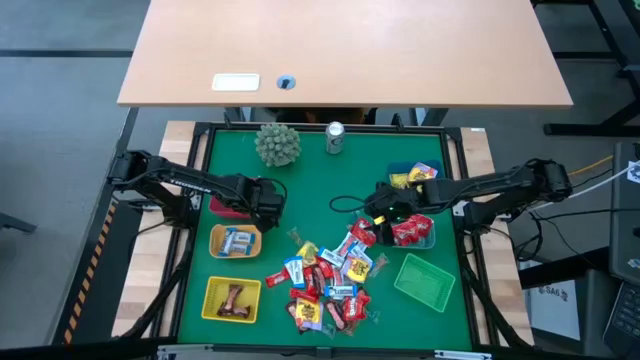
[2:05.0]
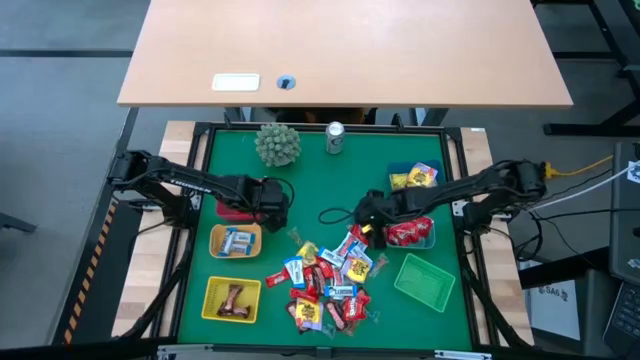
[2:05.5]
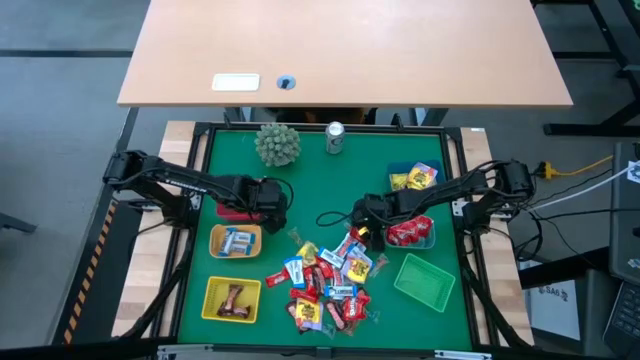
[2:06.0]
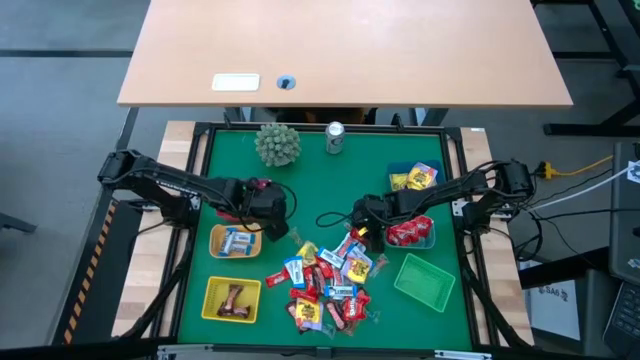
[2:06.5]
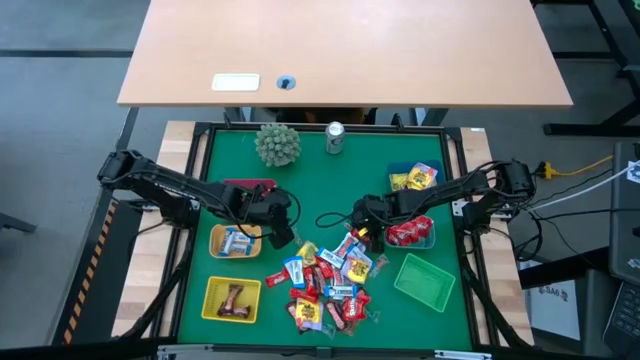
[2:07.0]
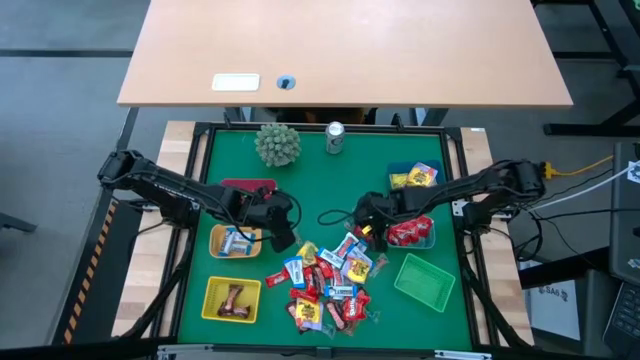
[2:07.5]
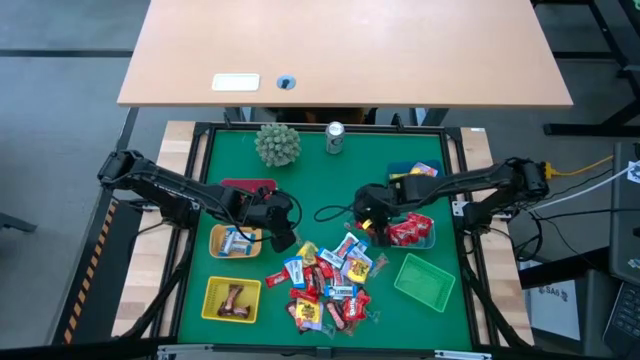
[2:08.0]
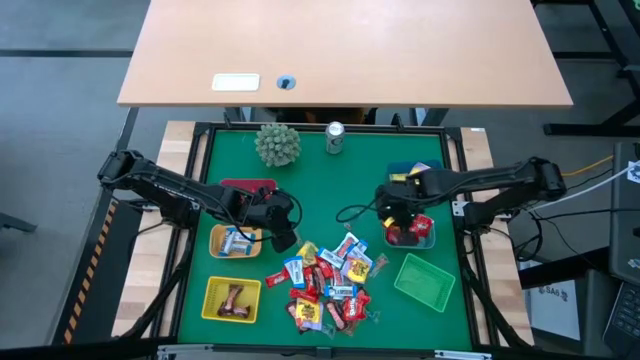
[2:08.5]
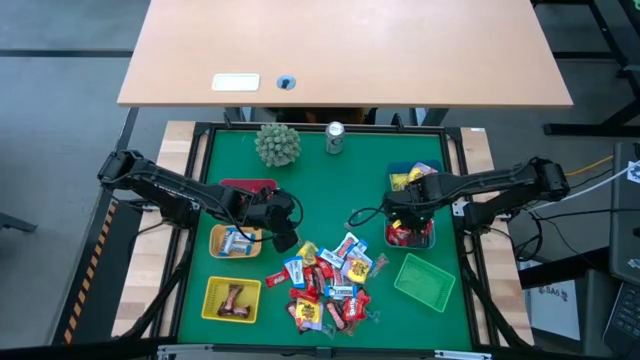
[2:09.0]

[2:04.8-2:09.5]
Task: Sort candy
Put the red candy into the light blue bin

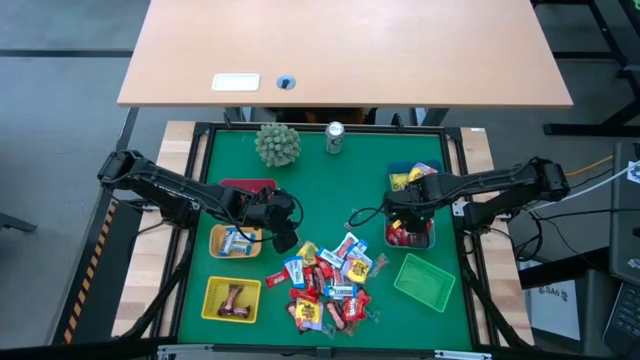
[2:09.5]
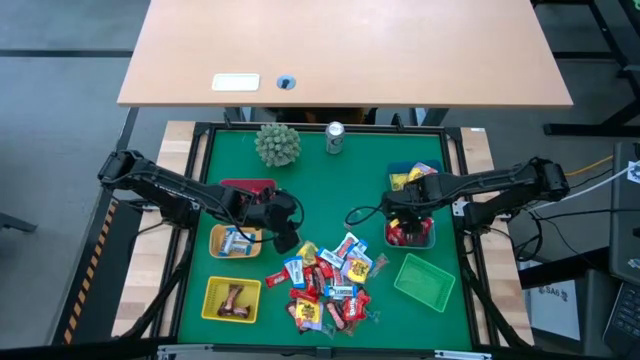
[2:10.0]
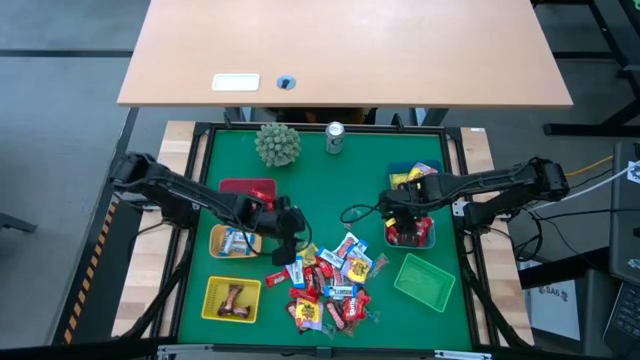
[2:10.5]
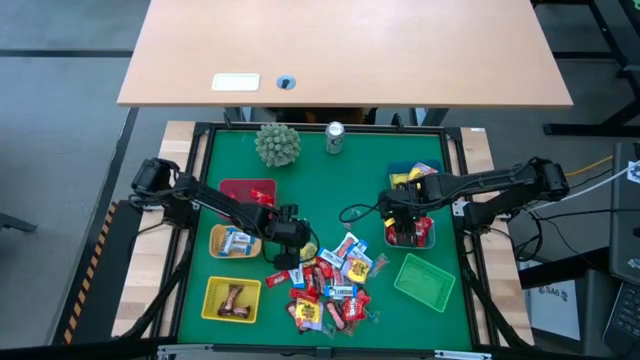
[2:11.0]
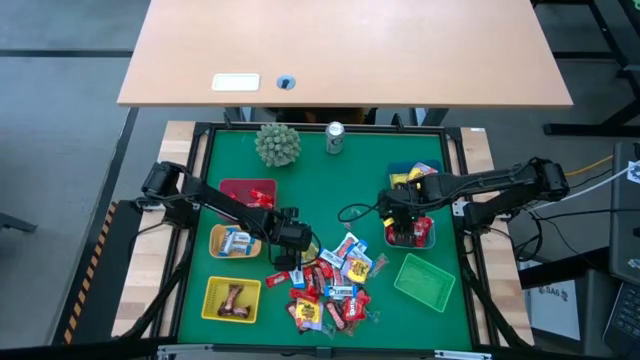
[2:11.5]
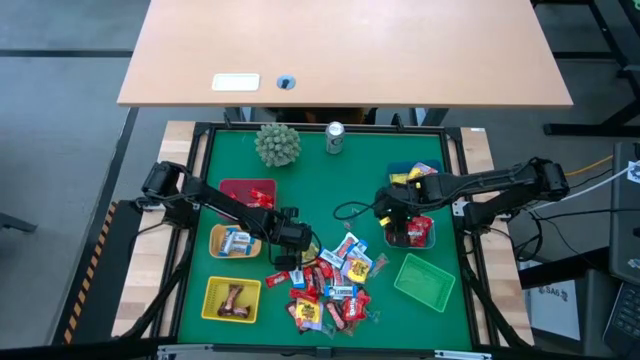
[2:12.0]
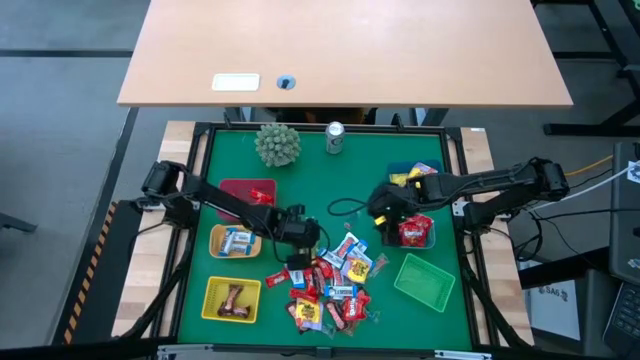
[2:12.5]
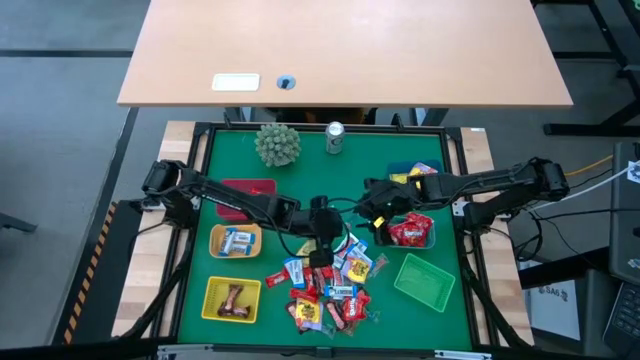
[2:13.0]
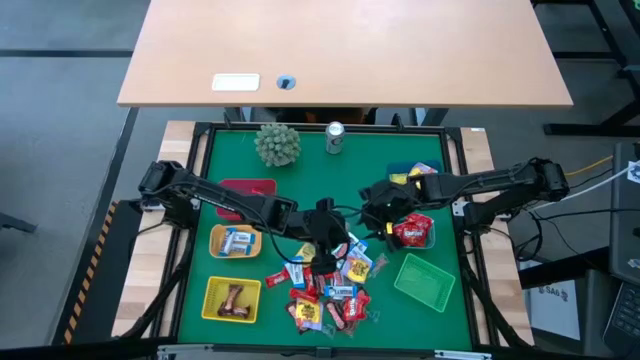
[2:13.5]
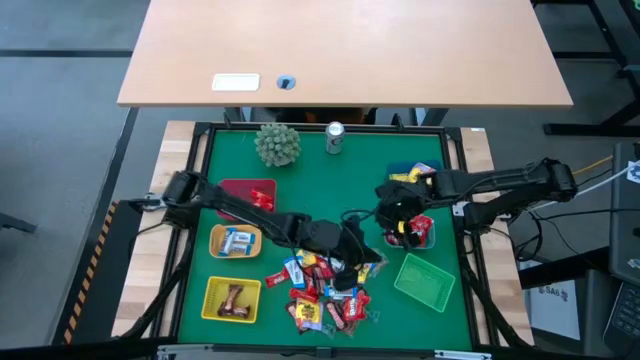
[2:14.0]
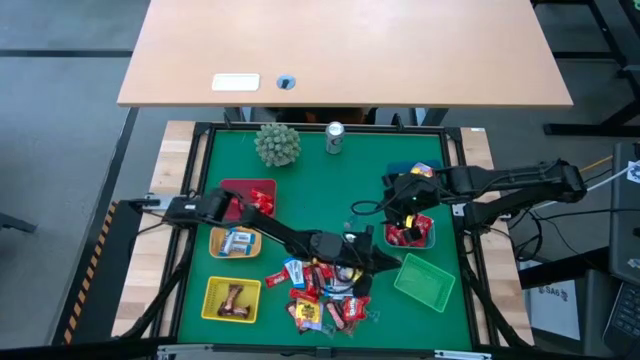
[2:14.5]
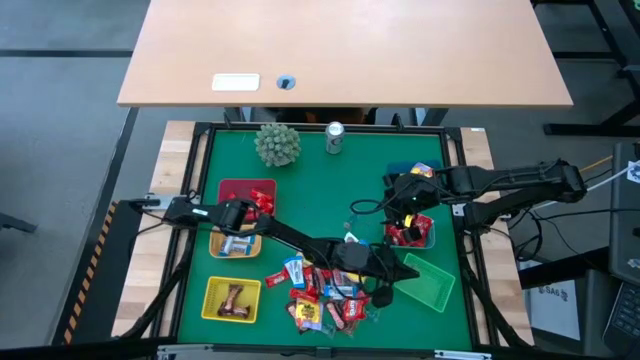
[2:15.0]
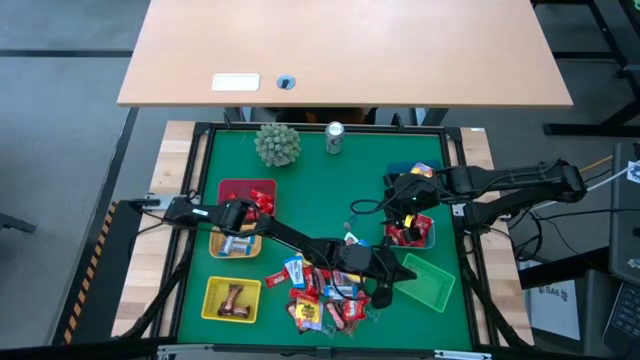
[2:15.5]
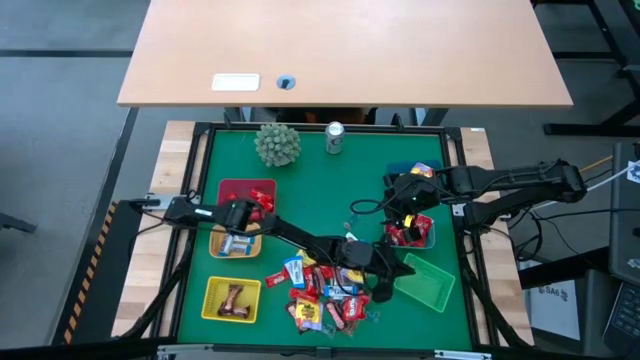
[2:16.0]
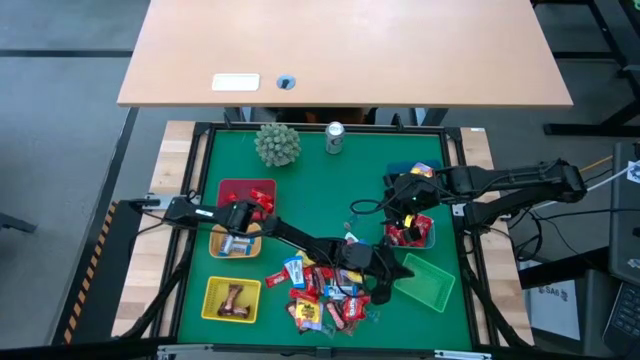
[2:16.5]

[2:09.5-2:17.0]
Put the green gummy into the green bin

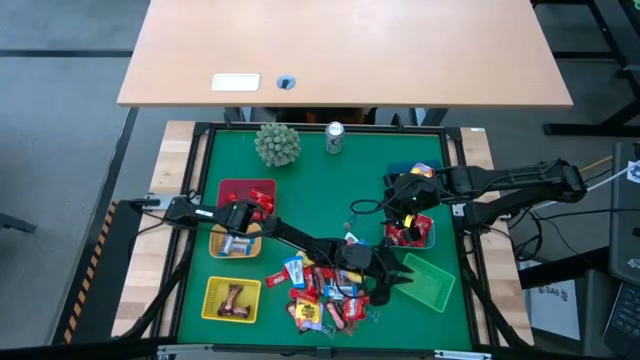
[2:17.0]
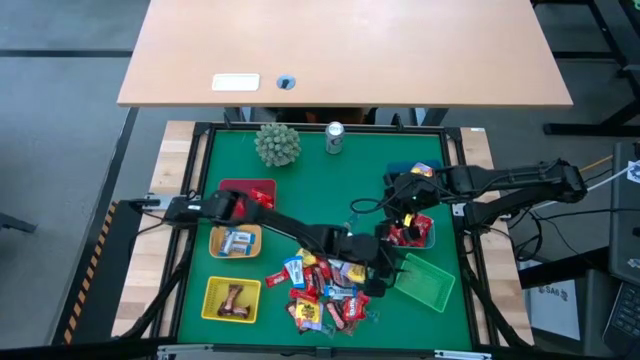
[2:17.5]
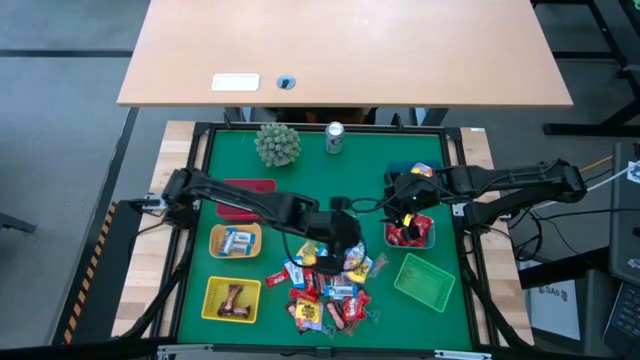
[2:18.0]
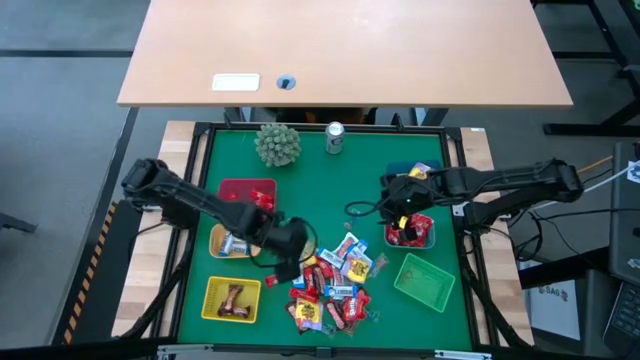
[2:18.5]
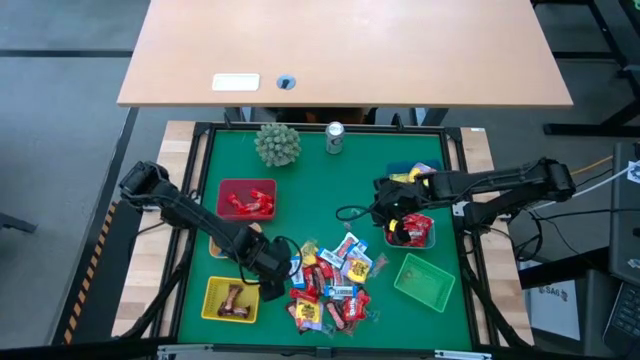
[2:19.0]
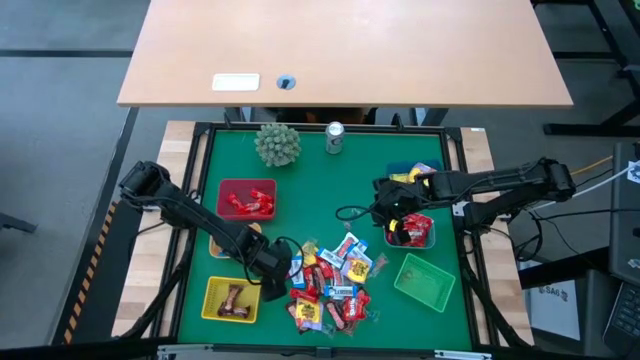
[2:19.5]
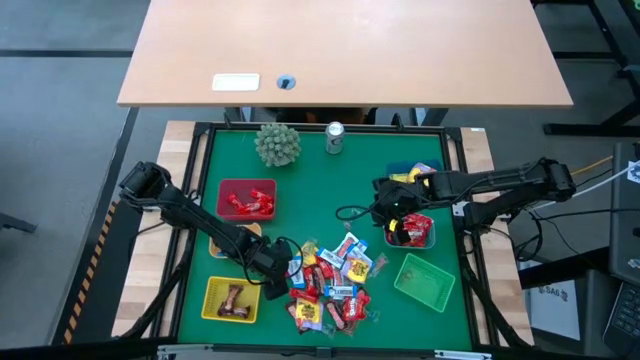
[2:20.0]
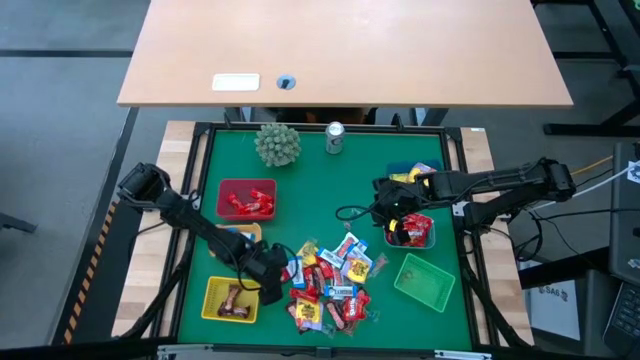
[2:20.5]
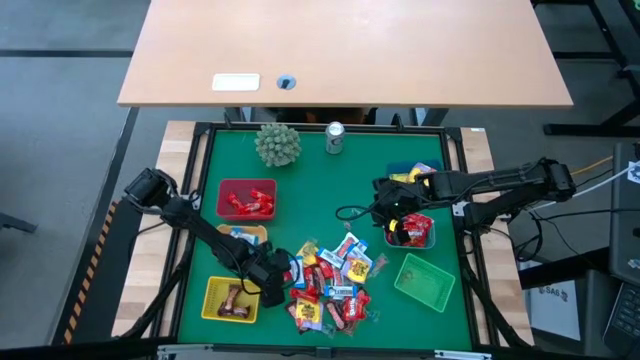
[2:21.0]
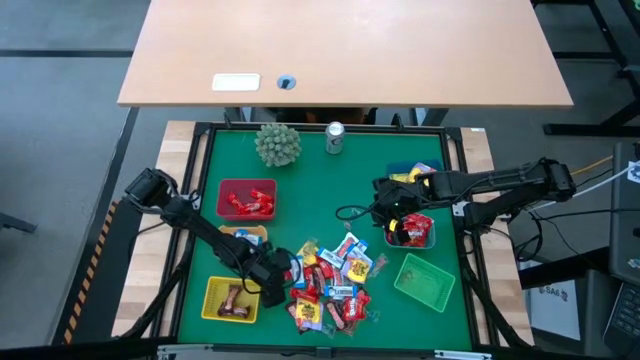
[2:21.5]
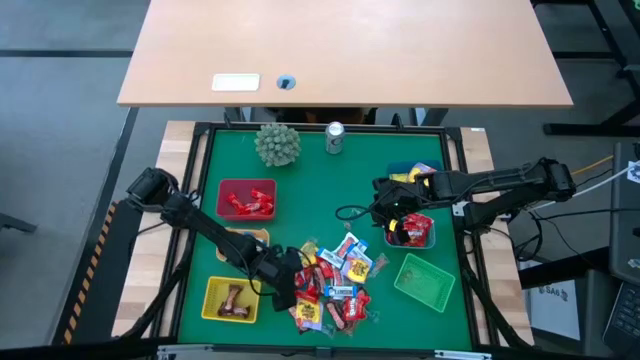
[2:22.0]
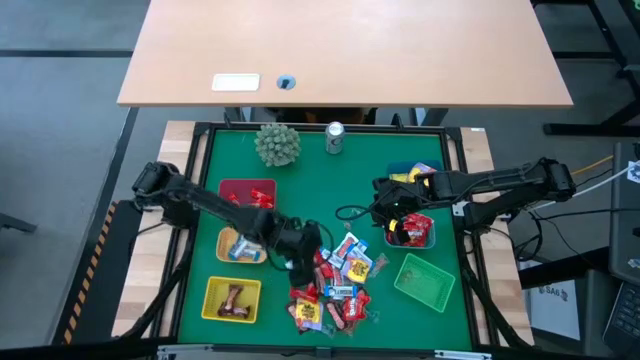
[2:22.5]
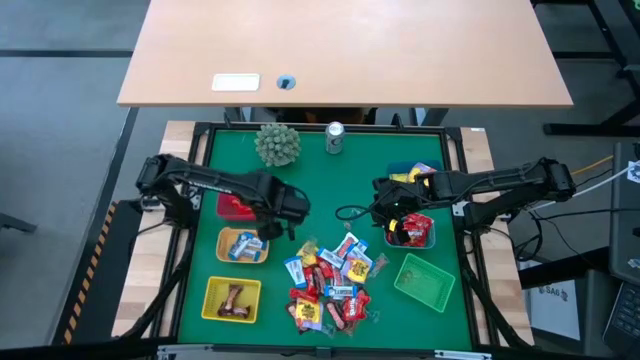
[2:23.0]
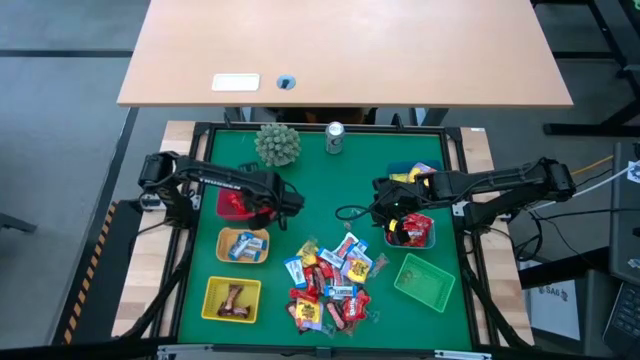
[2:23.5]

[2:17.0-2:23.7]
Put the red chocolate bar into the red bin

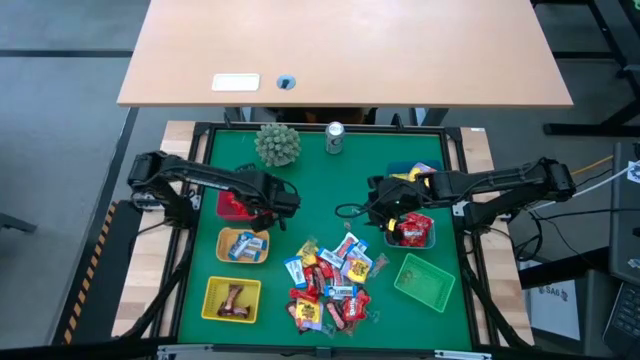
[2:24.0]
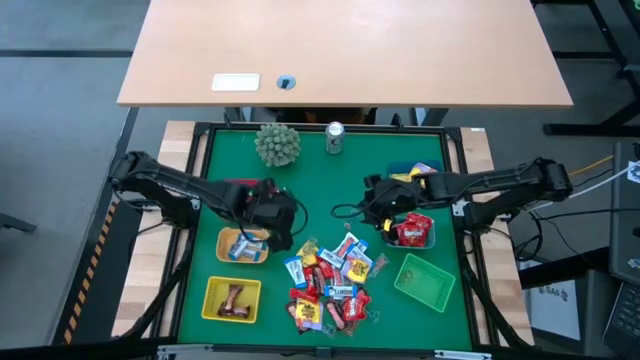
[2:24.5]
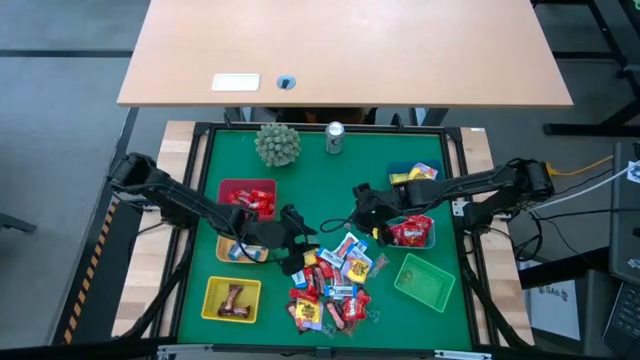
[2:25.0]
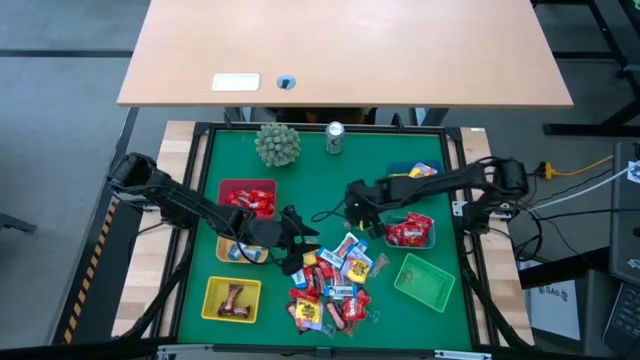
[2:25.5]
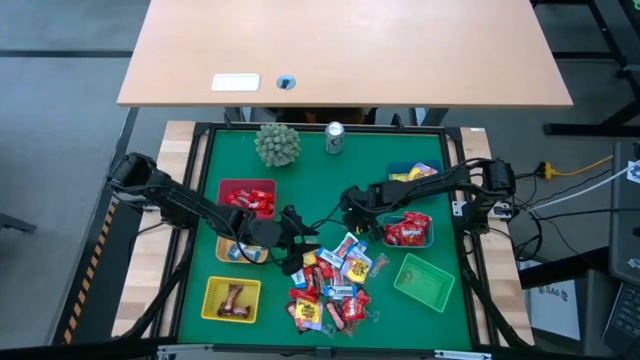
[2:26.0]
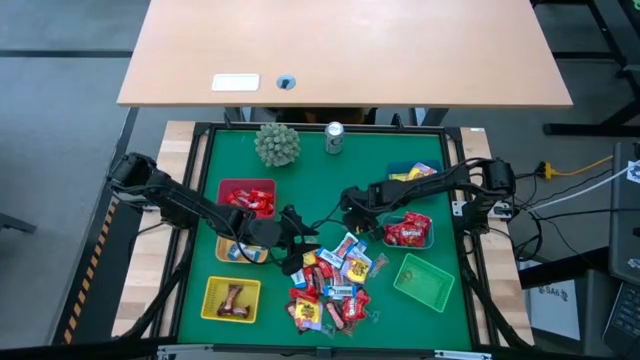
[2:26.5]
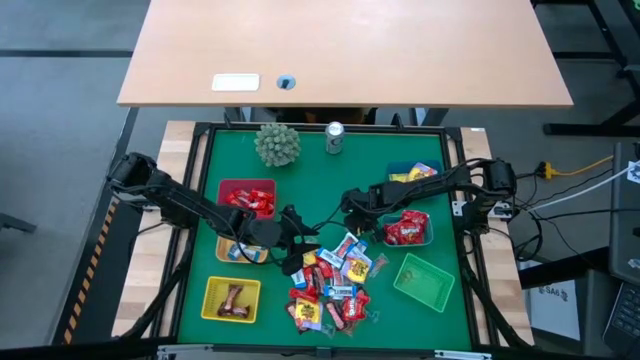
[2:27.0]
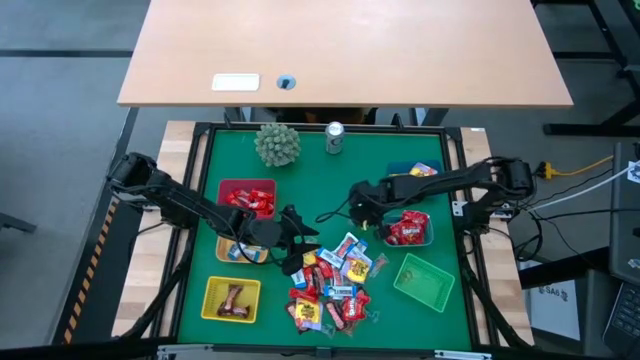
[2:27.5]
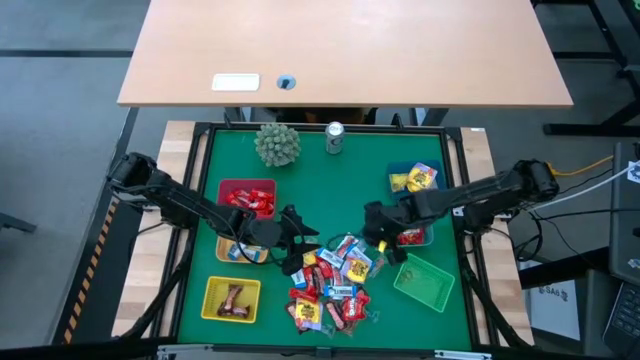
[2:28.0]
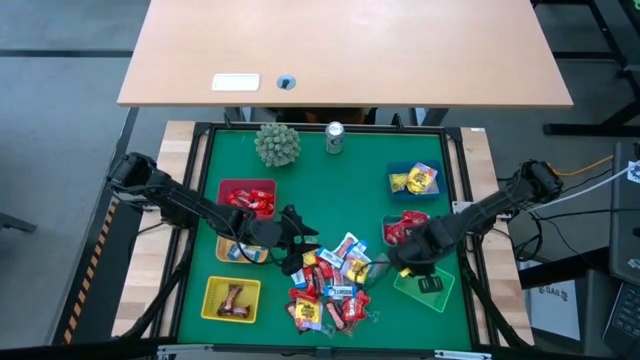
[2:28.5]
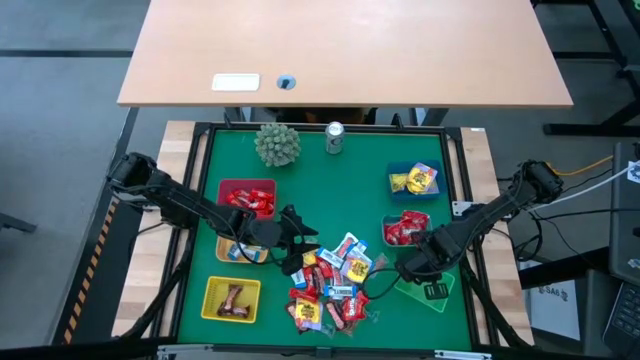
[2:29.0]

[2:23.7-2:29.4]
Put the blue gummy into the green bin
